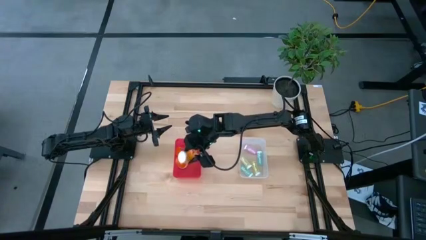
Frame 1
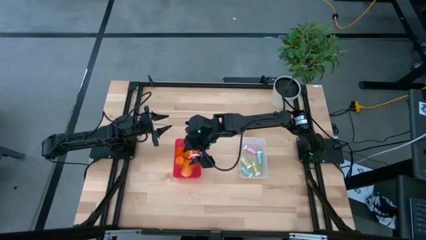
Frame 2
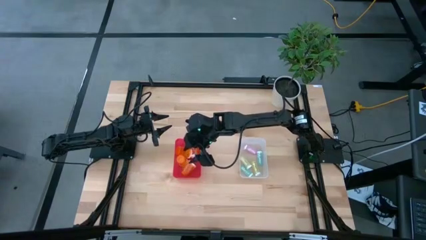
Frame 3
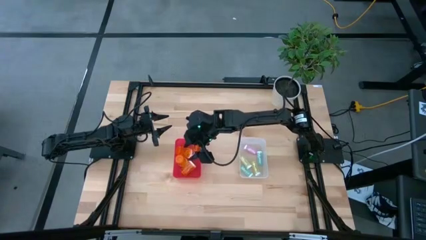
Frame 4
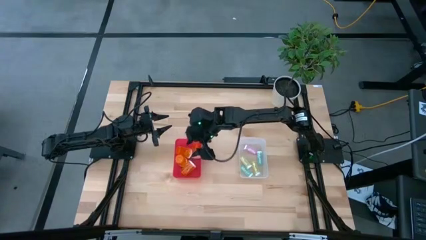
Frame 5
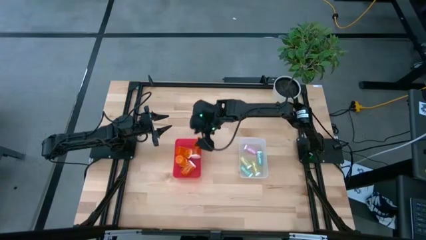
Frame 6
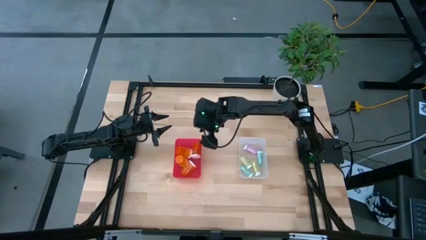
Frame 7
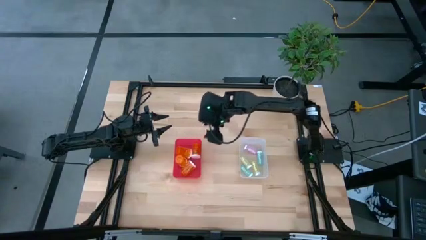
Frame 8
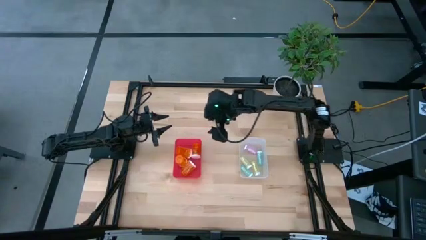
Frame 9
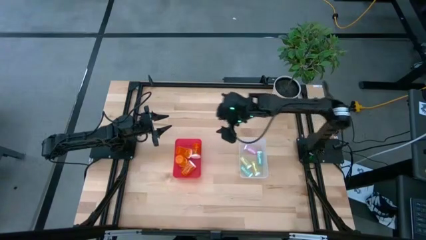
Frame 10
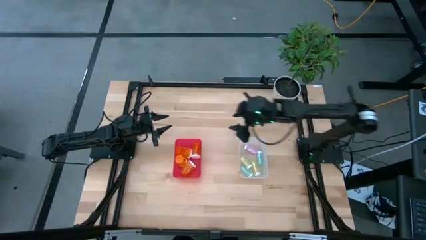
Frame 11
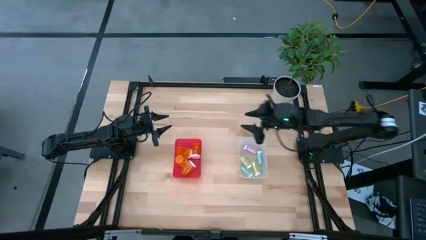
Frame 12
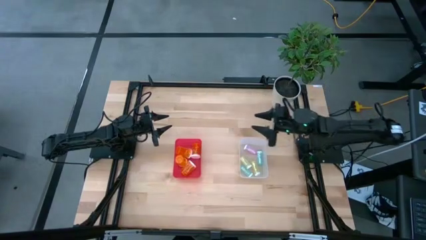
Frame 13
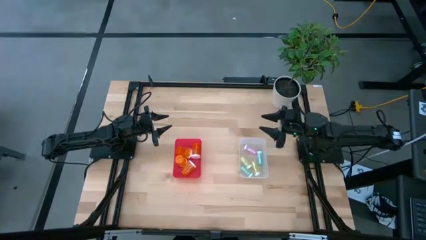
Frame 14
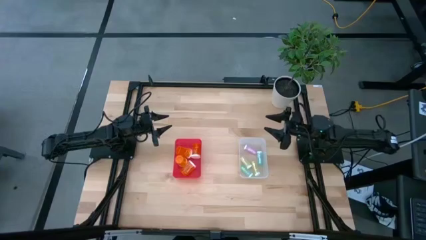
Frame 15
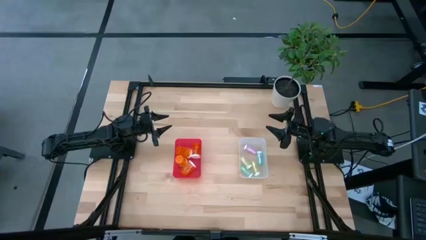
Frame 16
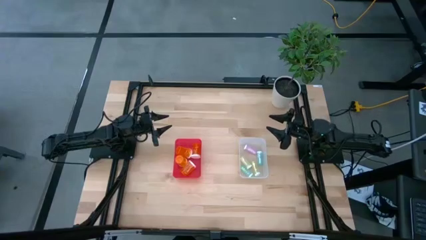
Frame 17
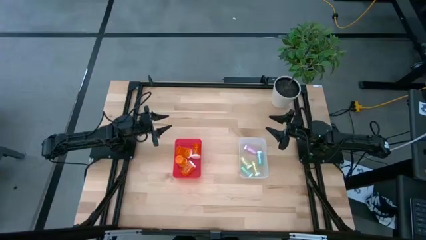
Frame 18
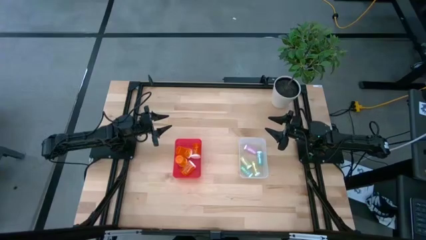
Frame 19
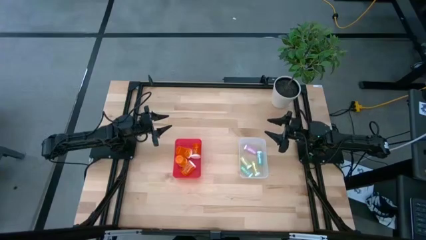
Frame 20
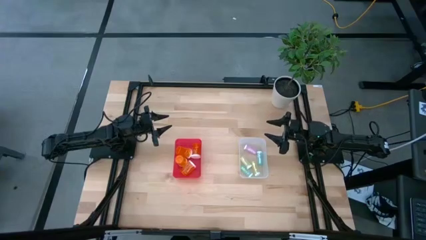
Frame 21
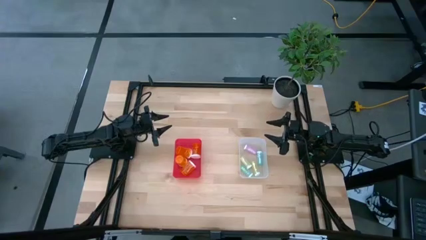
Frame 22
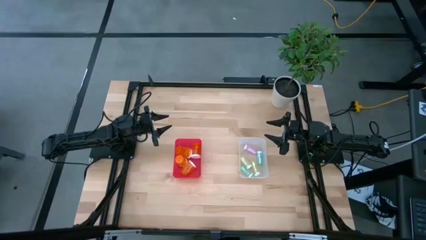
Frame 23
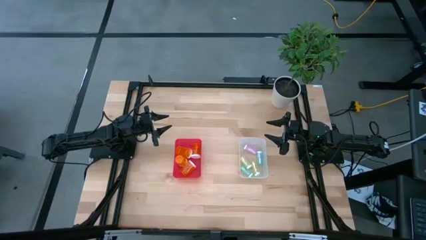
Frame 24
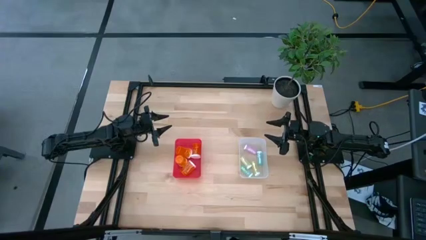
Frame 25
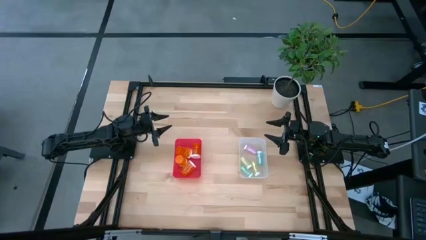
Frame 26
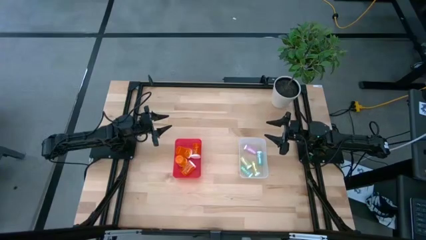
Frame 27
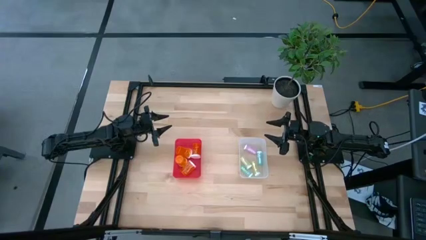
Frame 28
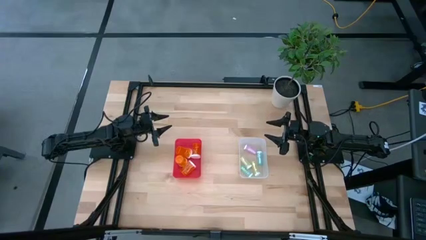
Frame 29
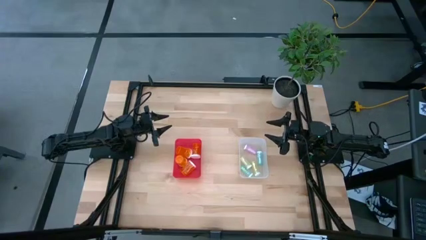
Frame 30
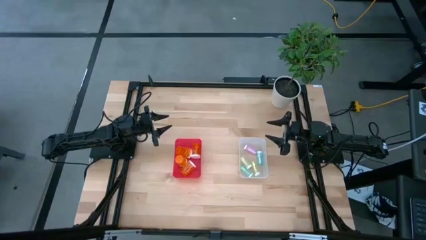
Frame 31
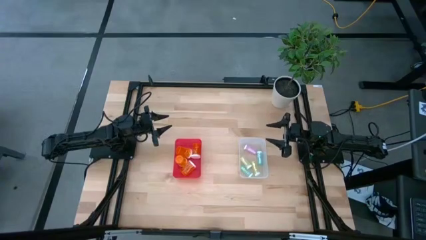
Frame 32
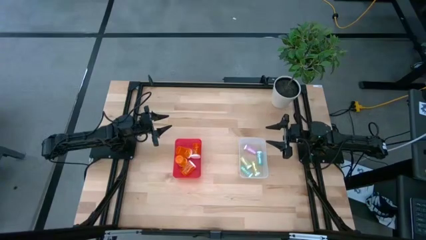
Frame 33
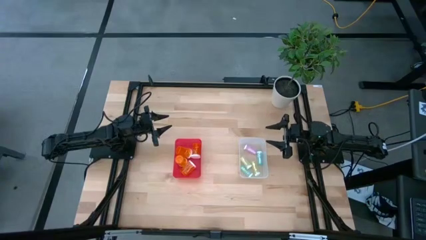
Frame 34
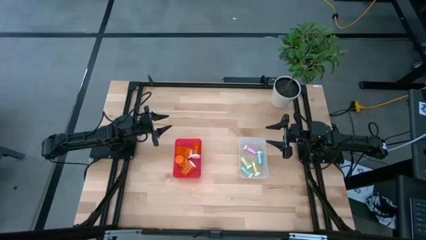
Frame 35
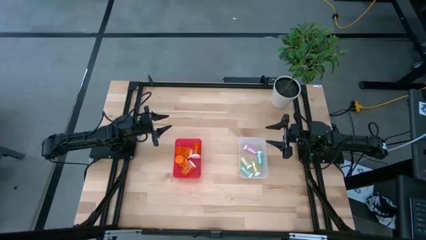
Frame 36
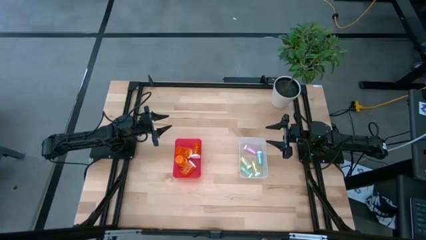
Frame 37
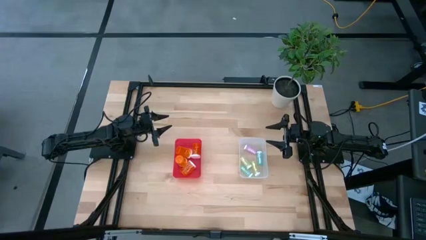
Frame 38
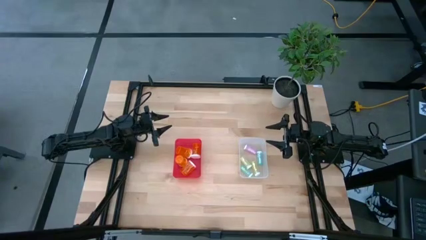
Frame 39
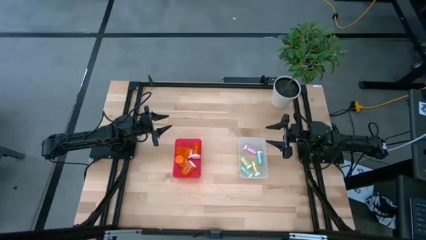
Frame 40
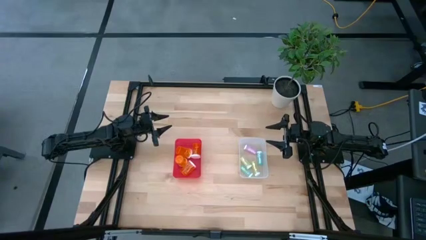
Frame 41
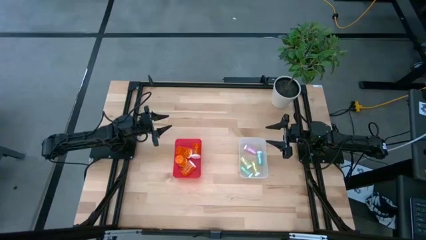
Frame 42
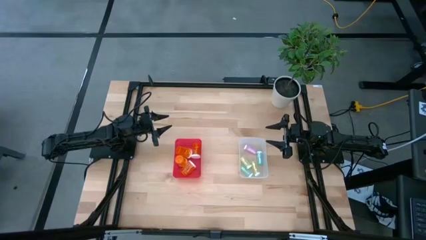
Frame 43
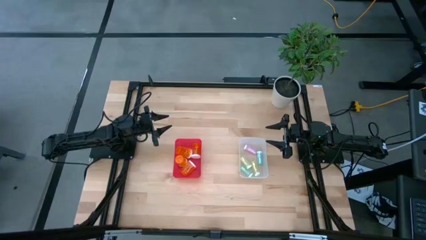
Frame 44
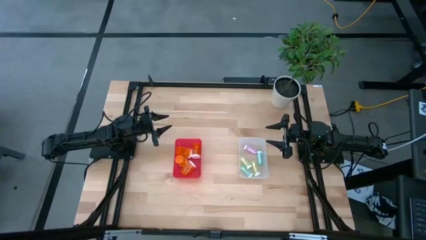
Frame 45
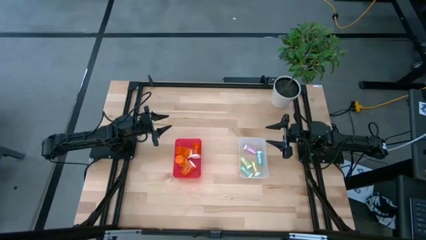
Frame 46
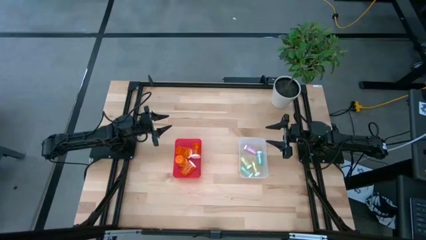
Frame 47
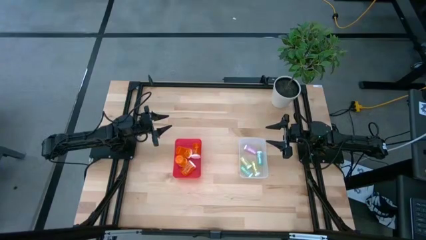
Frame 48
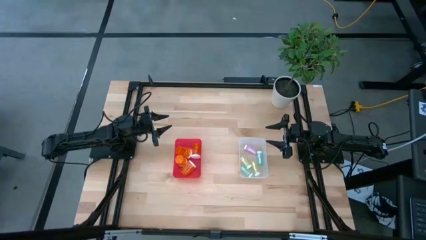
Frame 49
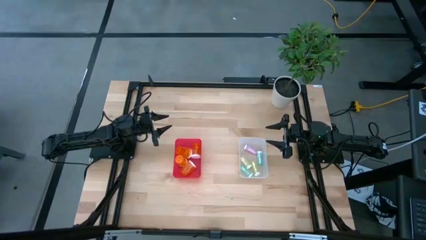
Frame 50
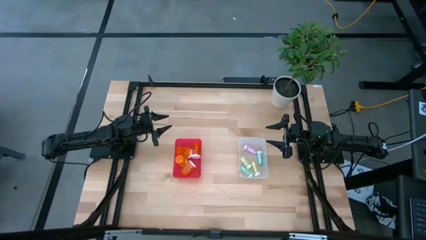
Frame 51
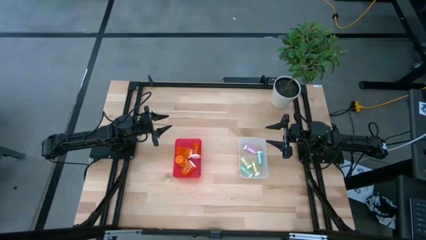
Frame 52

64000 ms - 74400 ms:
Task: Pick and place medicine bottles into bin by pill shape (circle, oval)
Return to Home Position

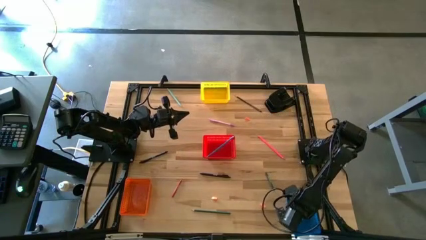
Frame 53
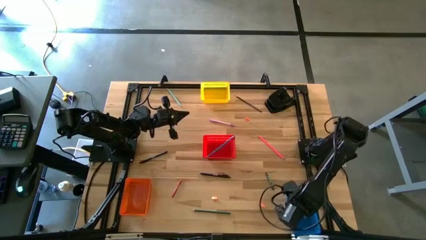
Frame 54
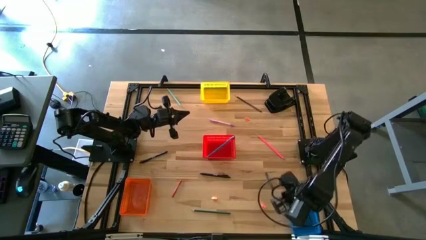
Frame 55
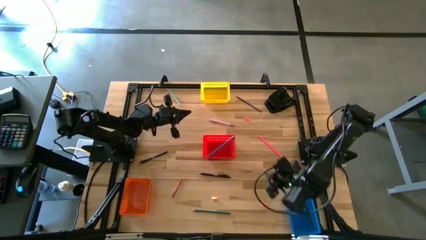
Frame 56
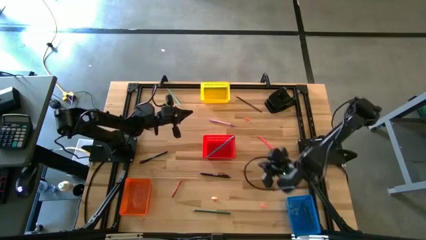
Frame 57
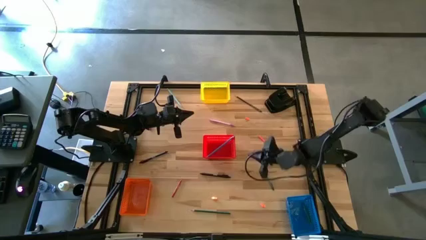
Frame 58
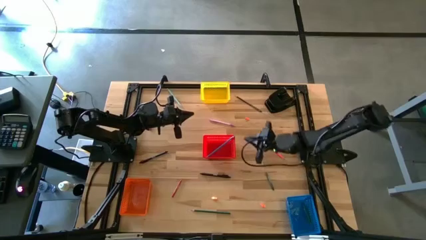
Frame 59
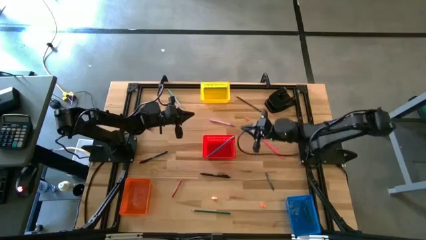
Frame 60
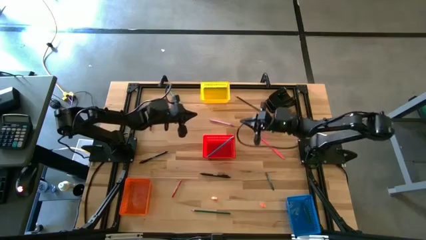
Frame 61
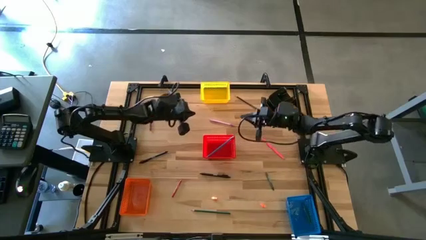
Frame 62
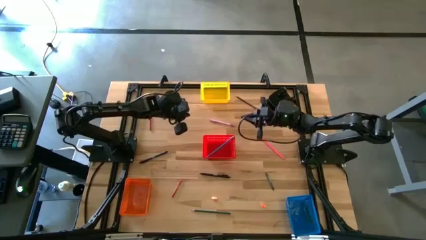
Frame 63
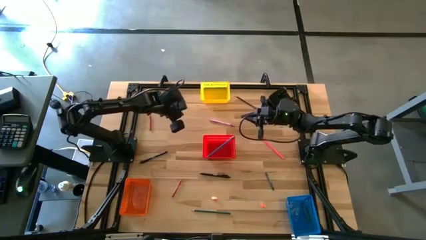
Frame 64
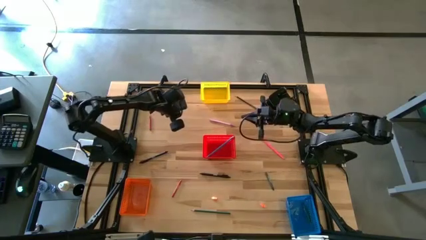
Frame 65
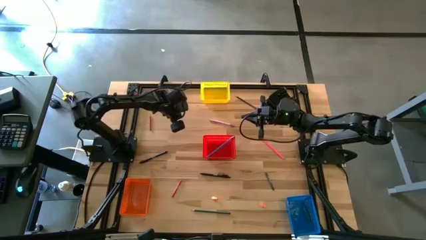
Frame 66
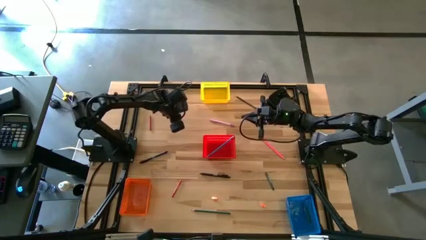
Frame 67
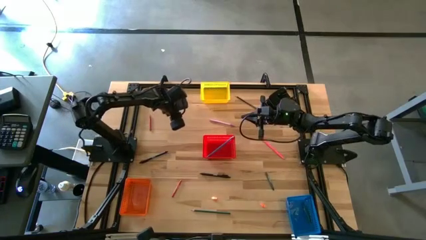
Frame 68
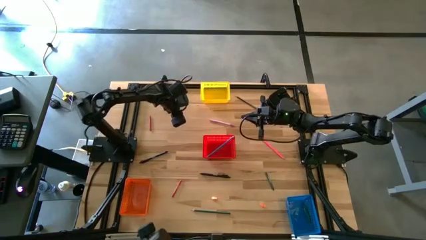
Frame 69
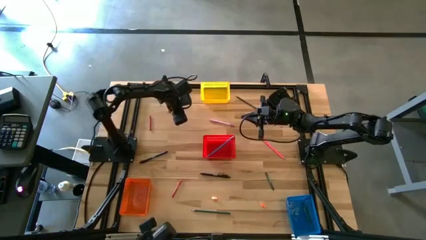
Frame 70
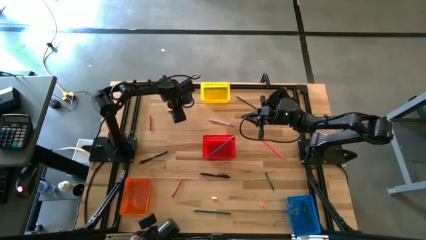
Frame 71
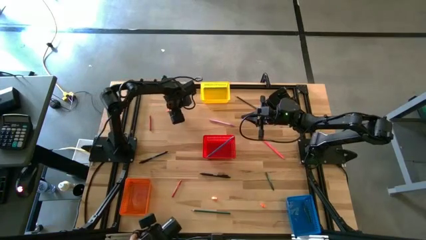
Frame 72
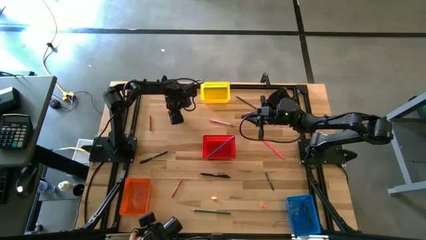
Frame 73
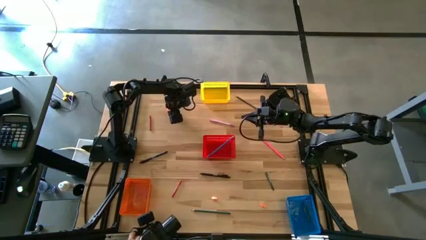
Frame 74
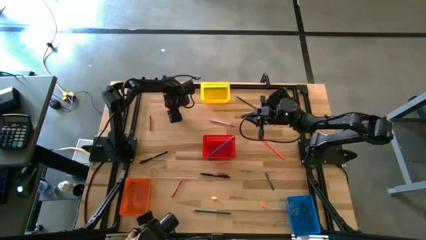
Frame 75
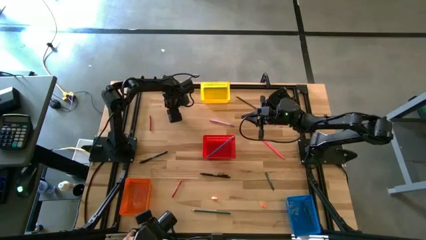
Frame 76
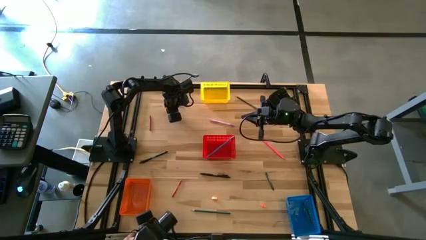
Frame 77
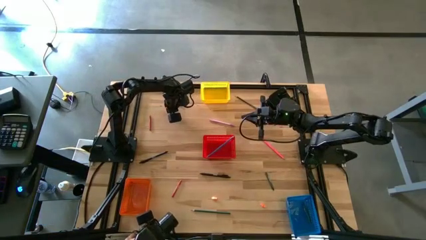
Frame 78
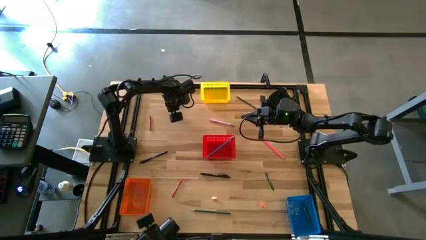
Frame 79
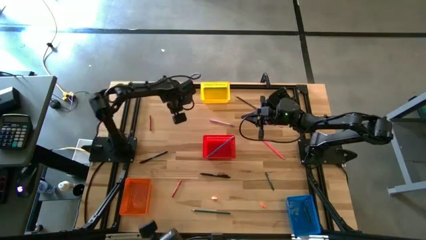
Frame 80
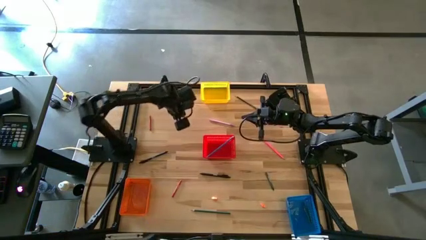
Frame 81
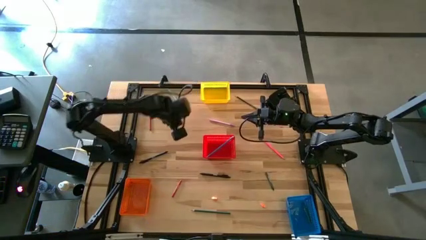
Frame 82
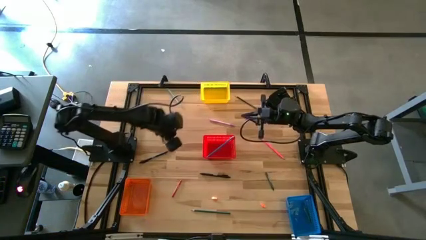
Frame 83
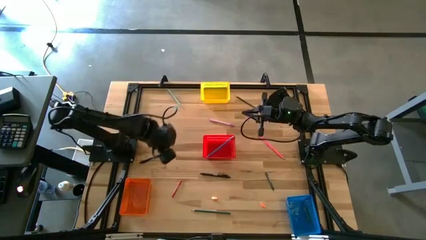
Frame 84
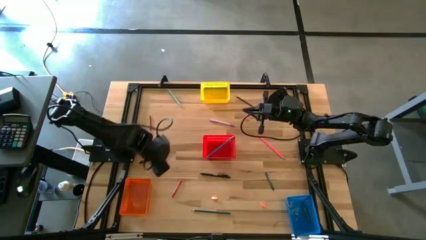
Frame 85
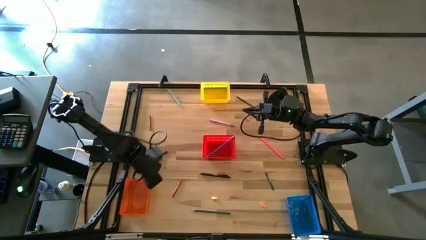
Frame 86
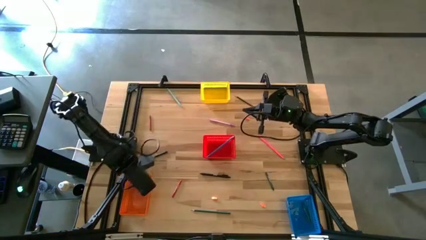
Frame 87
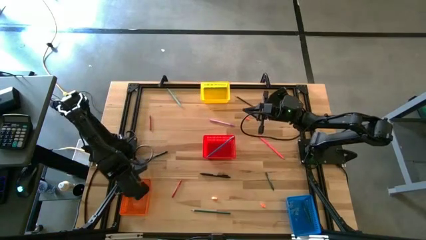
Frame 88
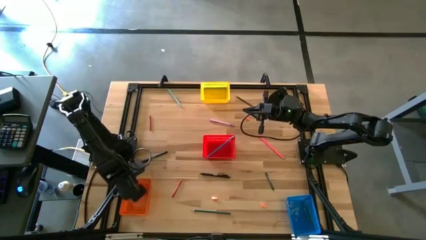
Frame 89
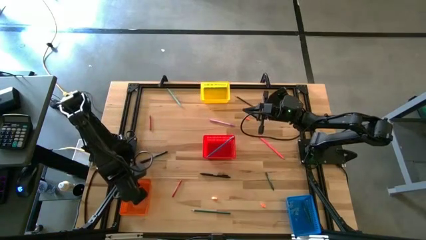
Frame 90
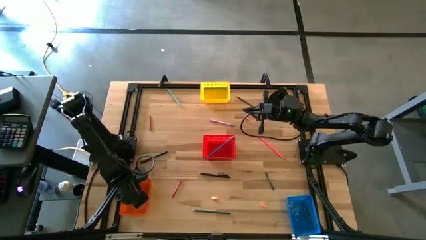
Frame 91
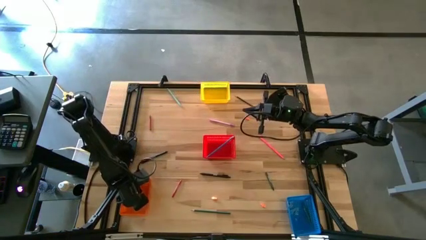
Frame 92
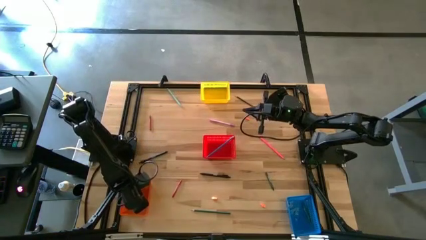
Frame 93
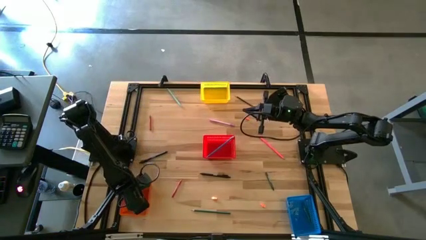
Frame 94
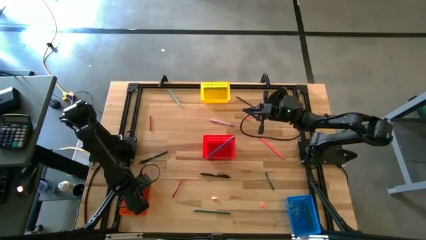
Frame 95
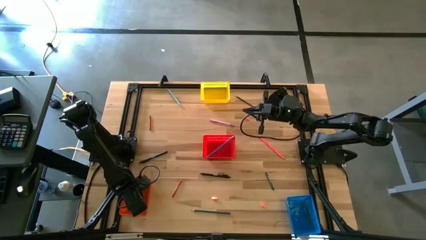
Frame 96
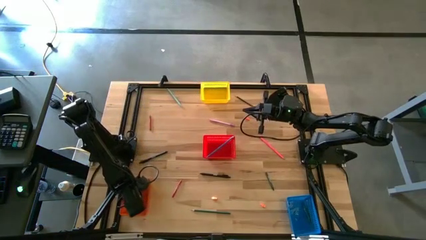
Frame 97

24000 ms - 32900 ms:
Task: Sort crayons/erasers/pens/pencils in bins
Put the orange eraser into the orange bin
